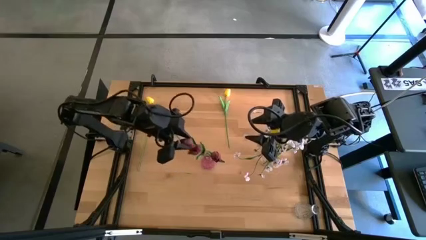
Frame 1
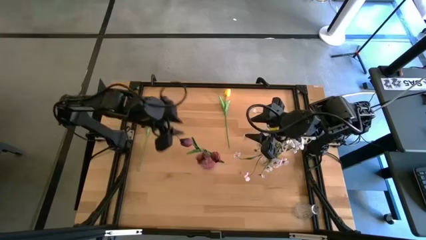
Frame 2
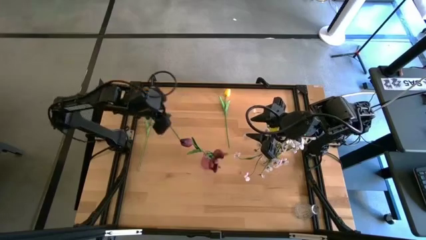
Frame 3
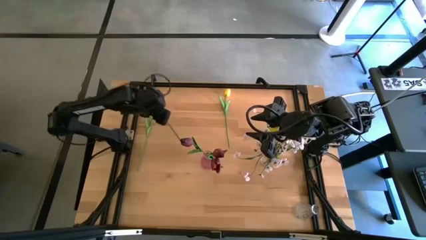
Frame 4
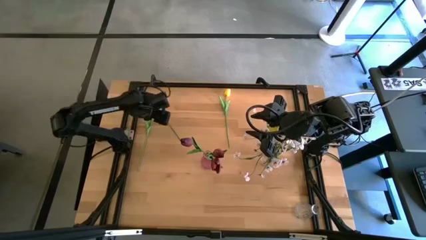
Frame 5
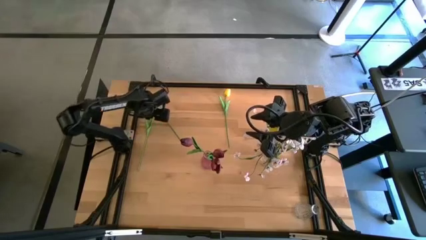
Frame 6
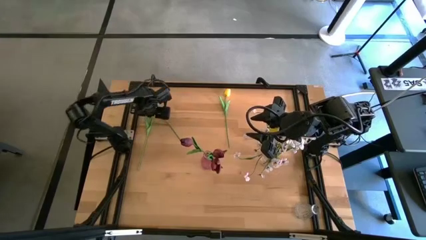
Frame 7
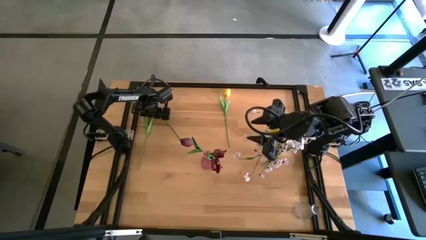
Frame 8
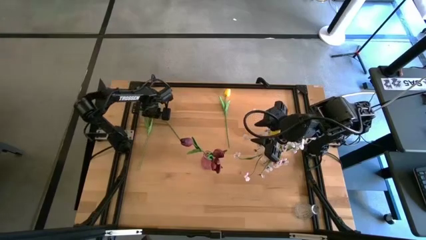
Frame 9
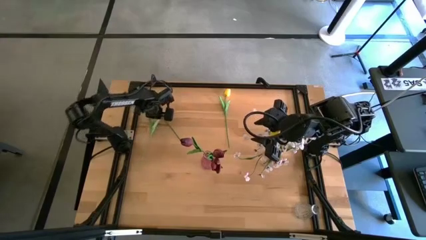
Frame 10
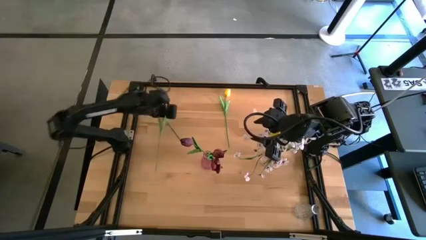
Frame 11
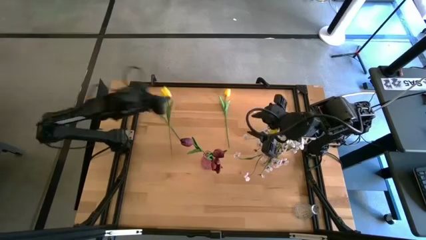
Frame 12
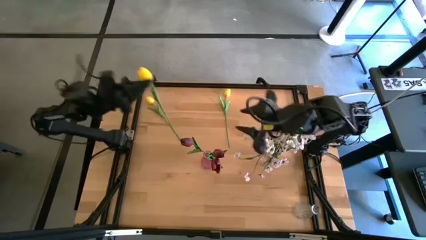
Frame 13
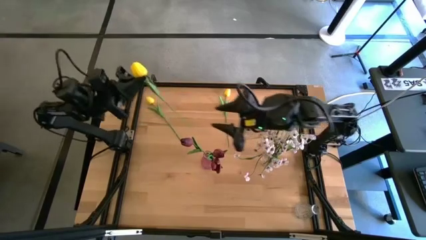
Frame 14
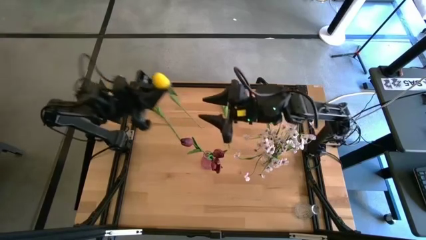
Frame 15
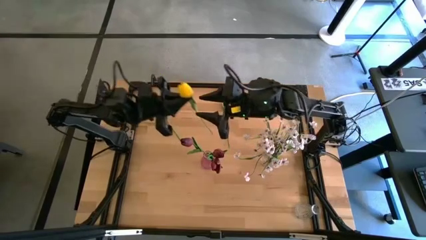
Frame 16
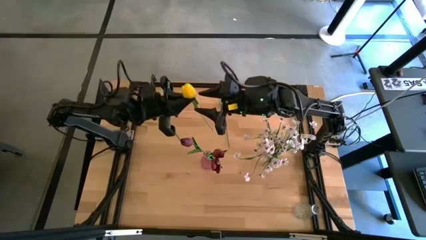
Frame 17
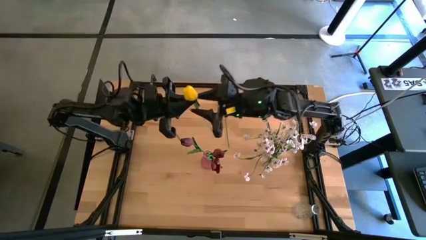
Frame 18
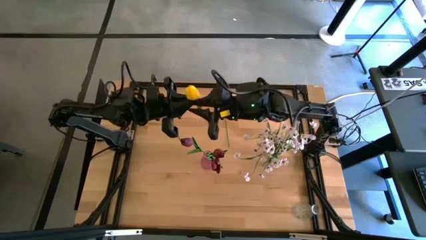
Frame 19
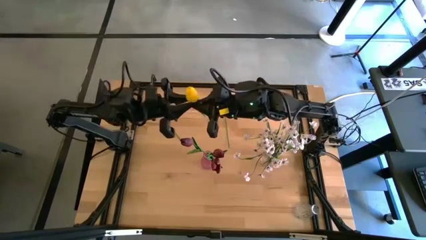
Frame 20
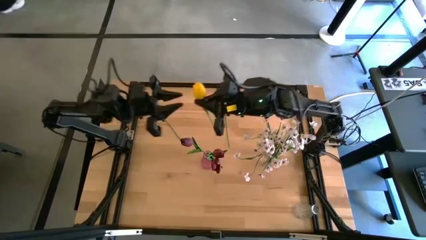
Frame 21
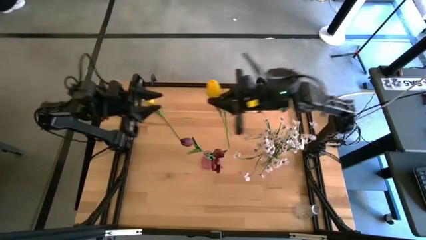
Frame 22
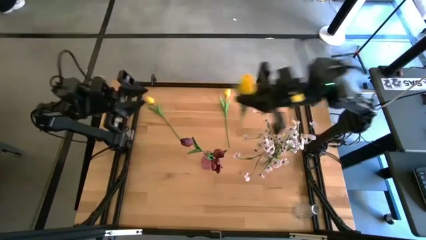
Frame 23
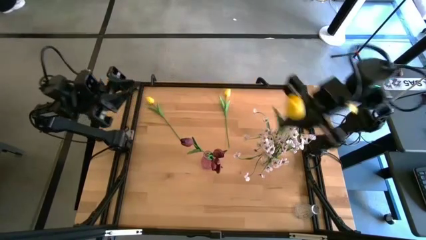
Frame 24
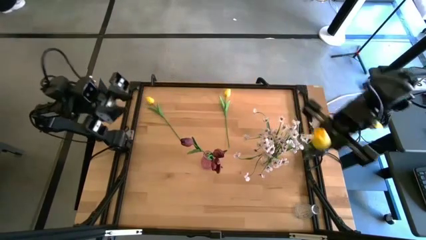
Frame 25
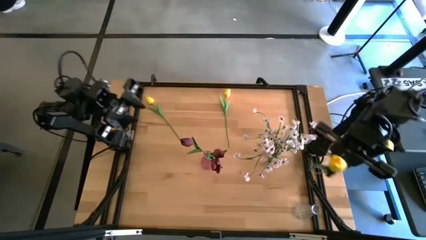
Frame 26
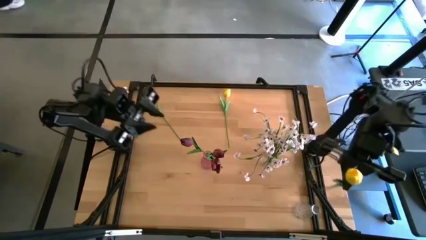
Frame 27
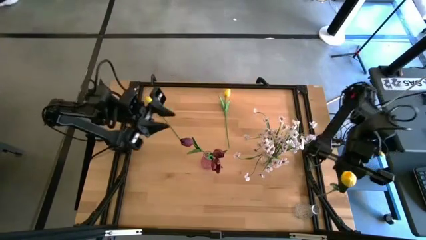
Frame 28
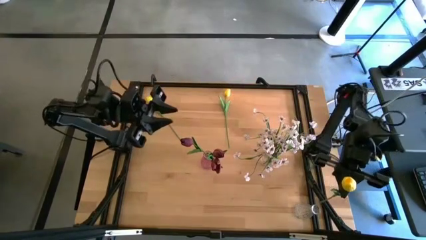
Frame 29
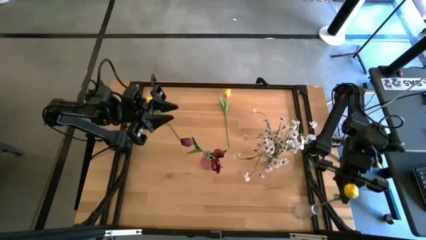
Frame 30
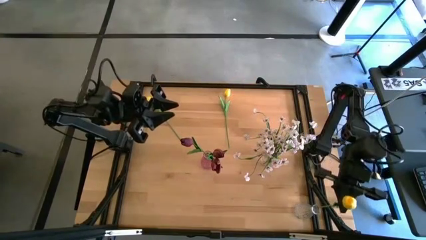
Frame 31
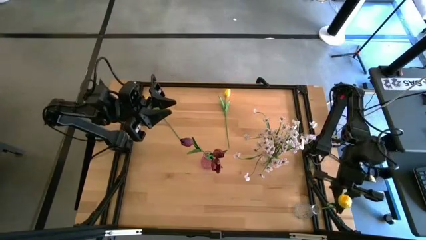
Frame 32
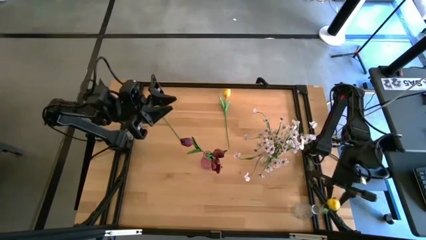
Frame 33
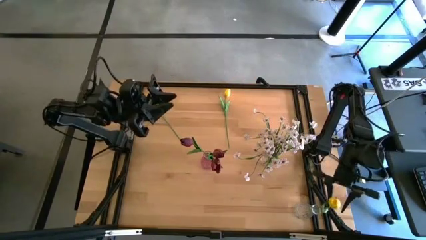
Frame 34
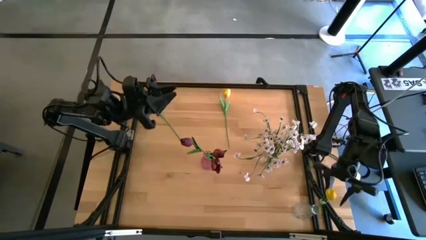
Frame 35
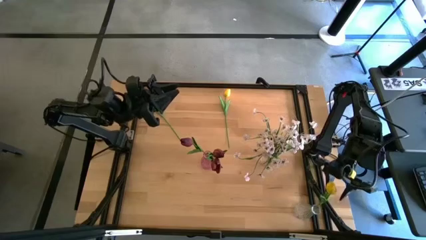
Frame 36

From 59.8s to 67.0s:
Task: Sort flowers into vase by color
Put the bottom yellow flower into the bottom transparent vase

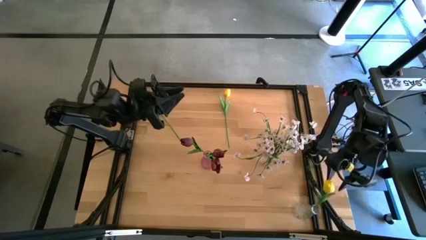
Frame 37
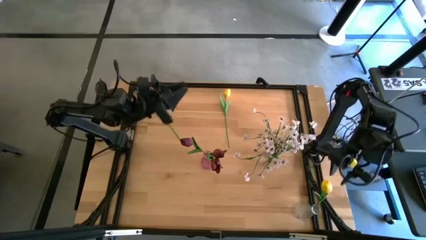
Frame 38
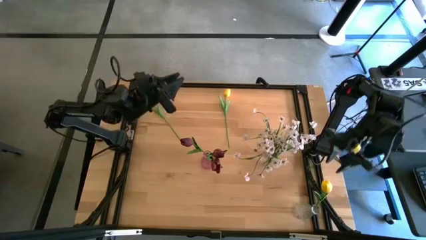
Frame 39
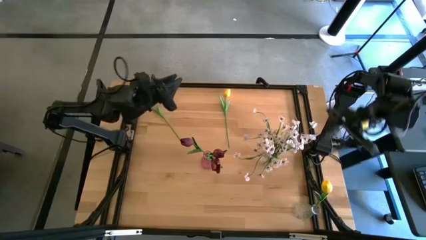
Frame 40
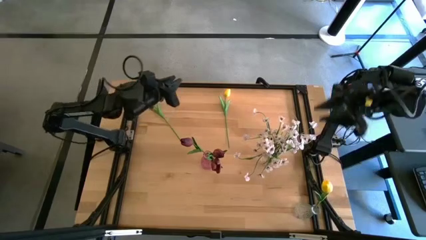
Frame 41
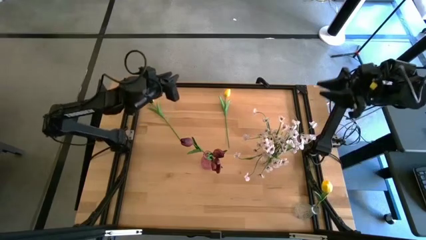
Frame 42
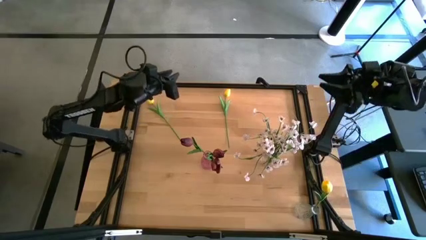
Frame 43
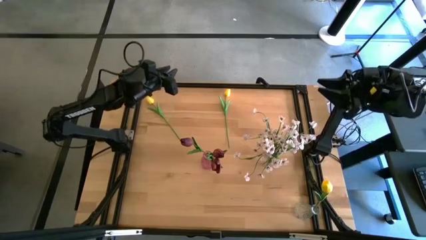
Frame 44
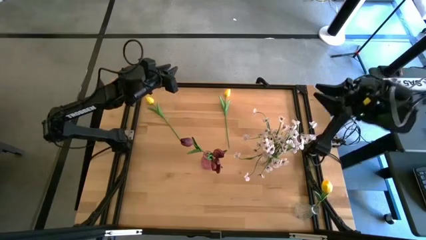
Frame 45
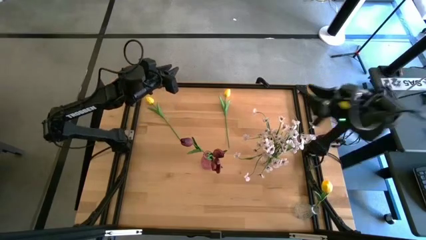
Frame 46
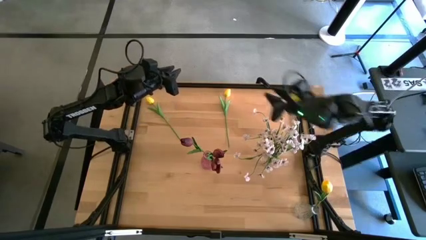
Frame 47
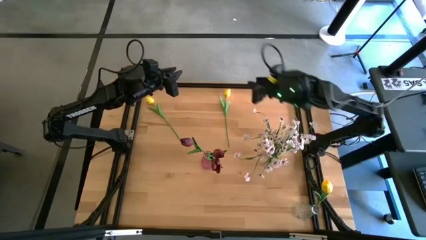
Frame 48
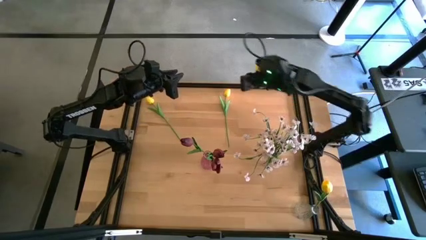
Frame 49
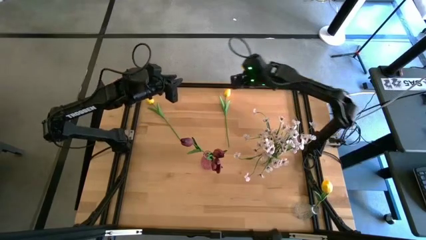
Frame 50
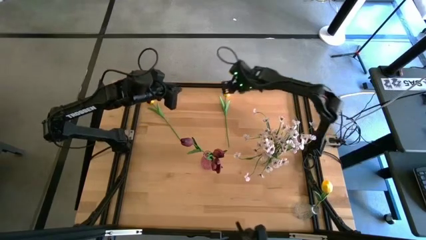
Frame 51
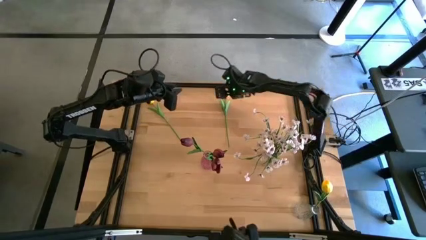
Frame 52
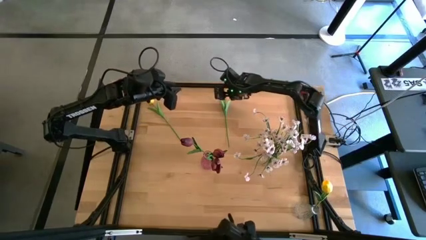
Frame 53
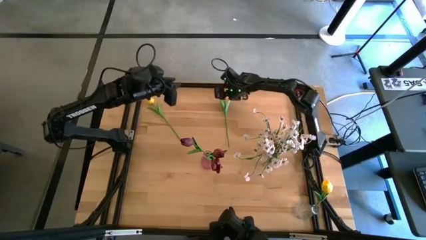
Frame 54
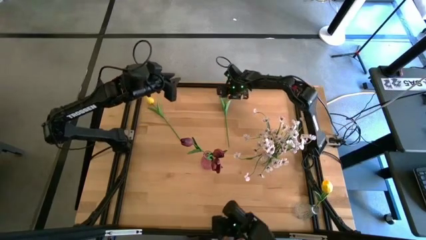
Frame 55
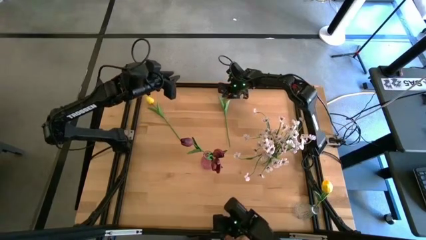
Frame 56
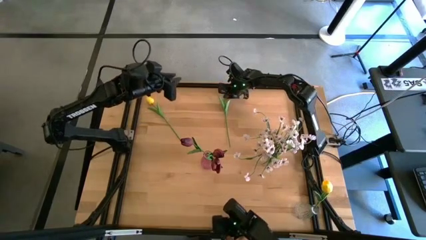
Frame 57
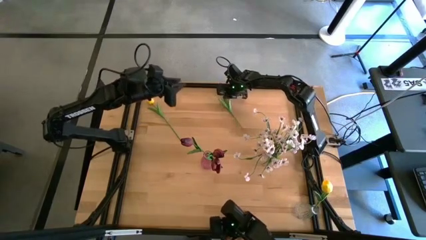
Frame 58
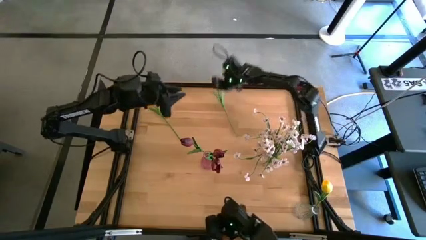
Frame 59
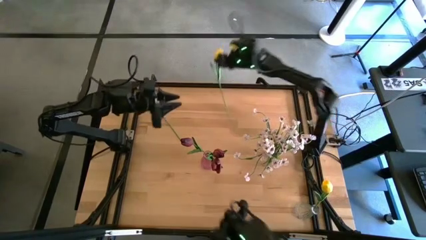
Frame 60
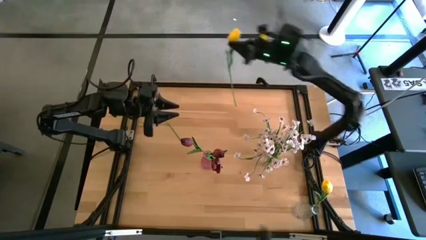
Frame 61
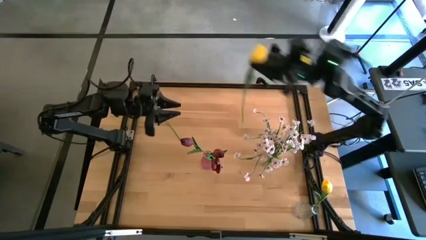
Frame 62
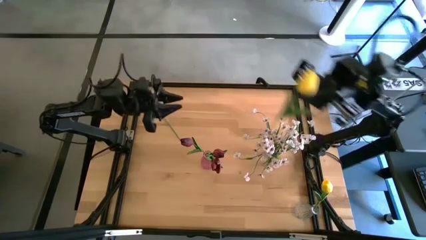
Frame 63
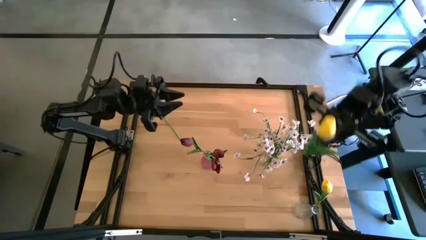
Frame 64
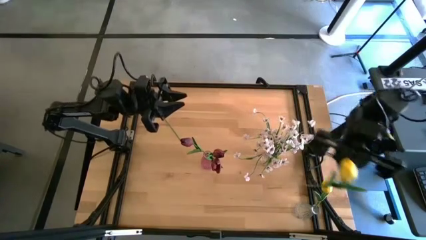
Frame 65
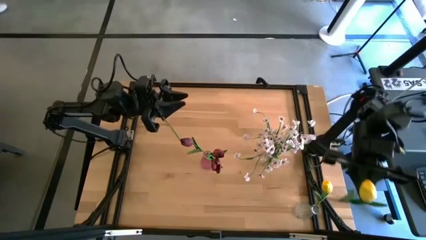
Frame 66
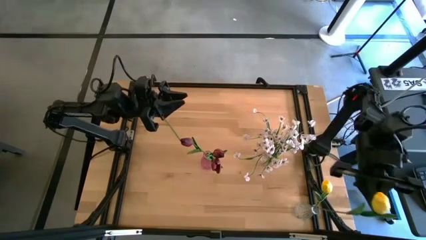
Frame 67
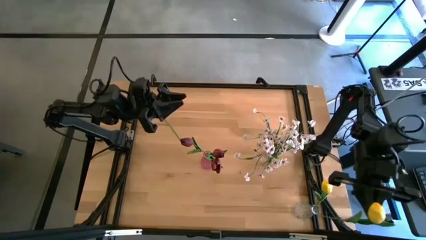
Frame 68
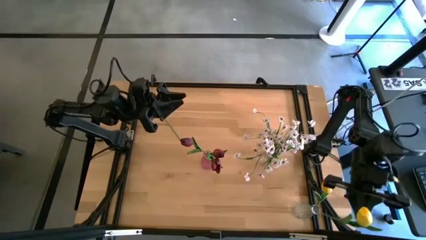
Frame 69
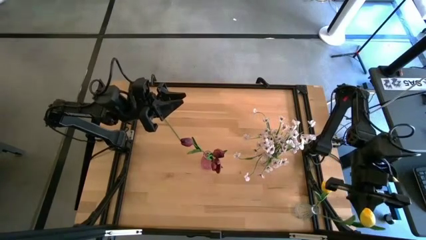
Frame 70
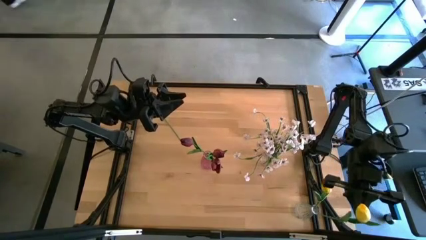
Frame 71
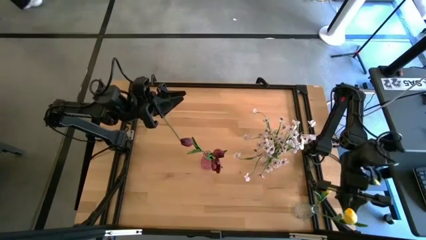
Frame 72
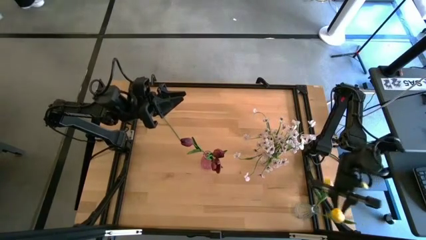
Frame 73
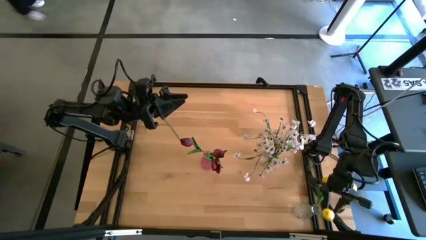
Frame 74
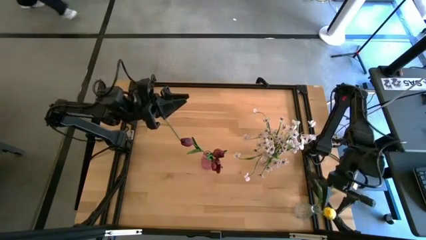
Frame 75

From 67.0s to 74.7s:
Put the right yellow flower into the bottom transparent vase

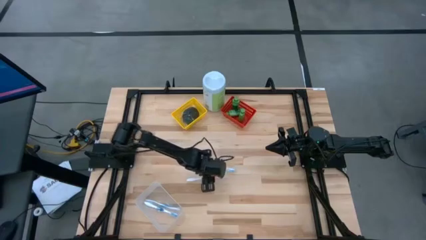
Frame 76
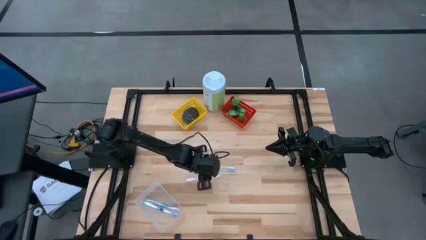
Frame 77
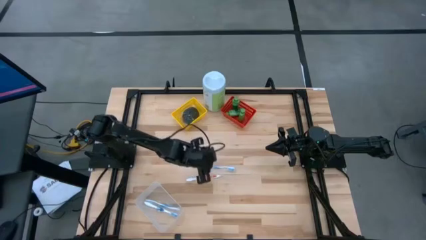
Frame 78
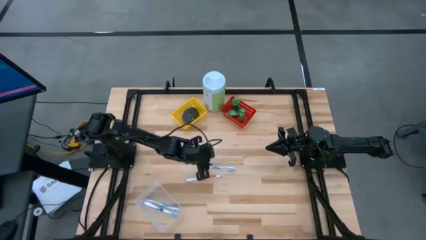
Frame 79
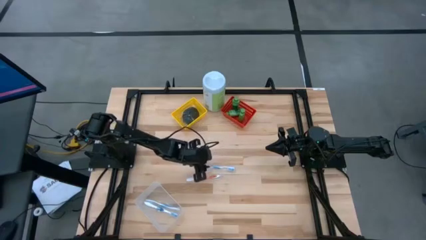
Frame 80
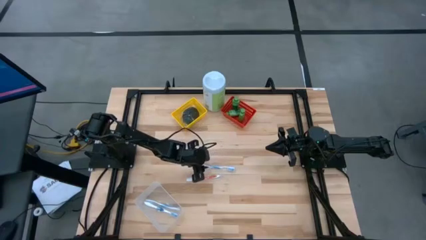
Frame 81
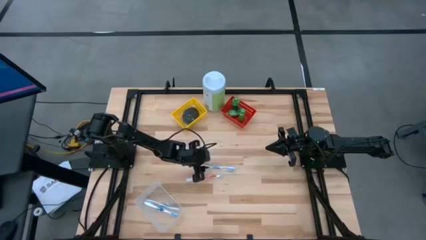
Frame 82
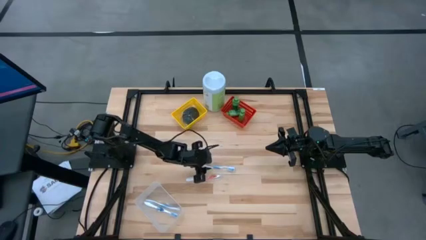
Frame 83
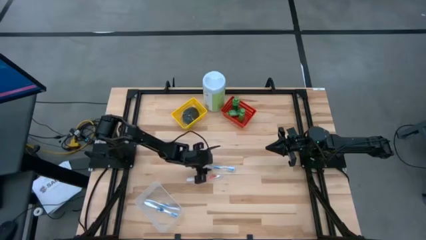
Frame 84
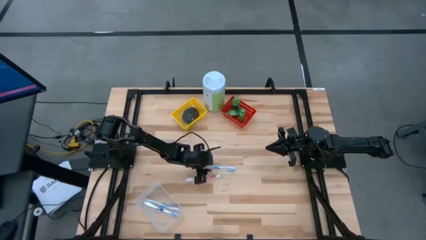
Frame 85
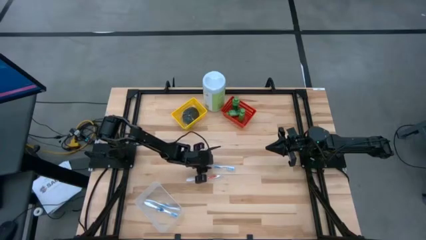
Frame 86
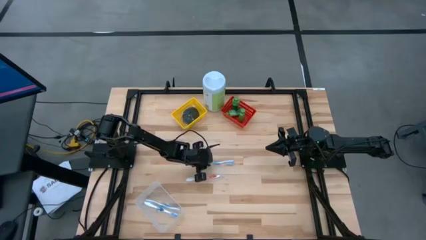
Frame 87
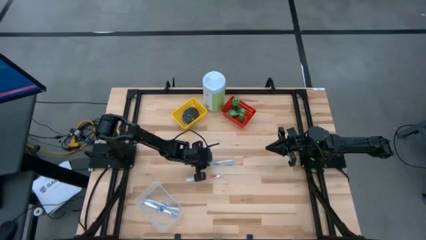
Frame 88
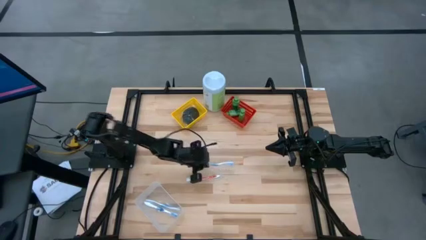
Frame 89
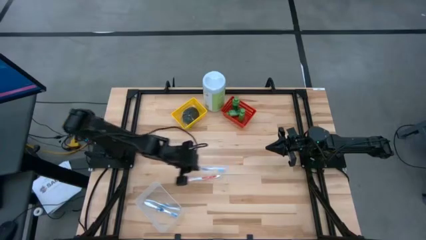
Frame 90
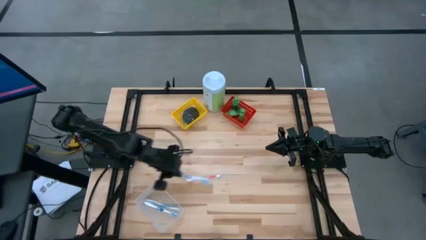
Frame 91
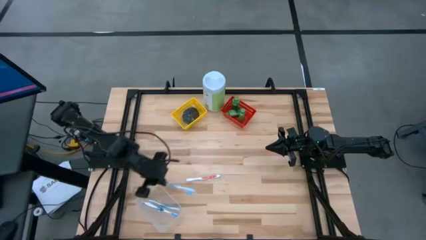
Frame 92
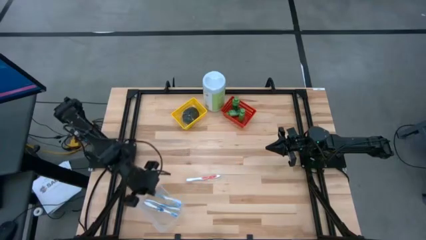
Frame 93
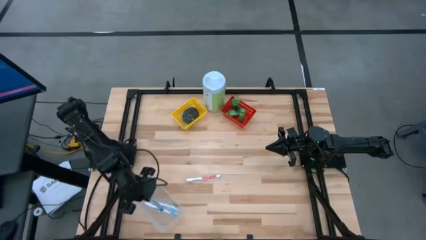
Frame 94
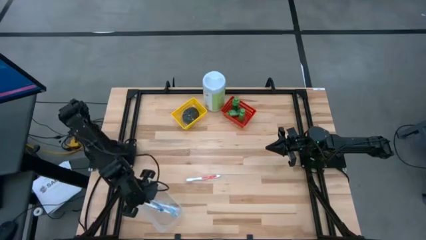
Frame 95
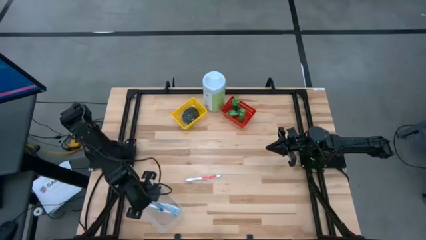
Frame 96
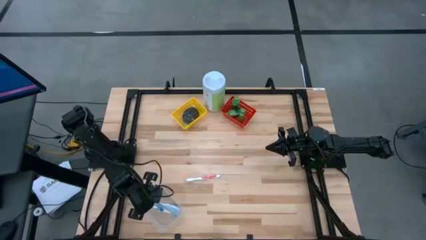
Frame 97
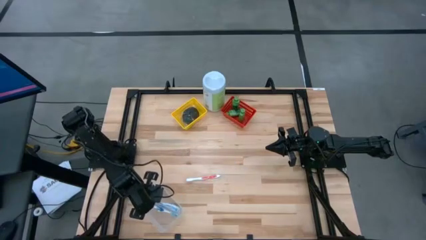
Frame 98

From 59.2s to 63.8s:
Task: Pick & Place Travel size toiletries
Put the blue toothbrush into the transparent bin
